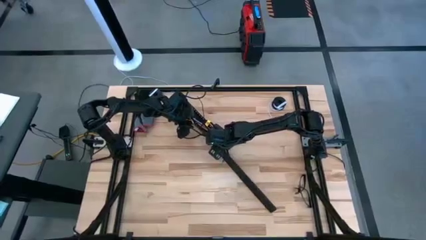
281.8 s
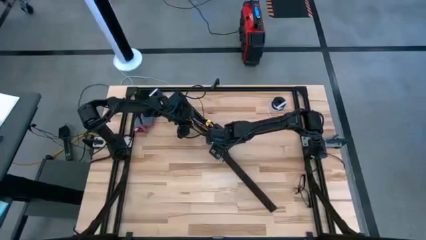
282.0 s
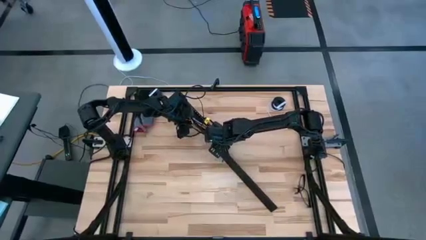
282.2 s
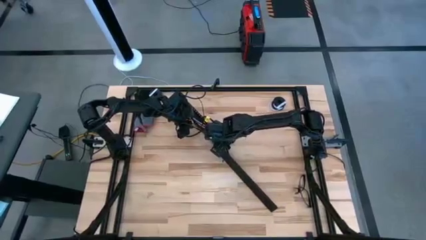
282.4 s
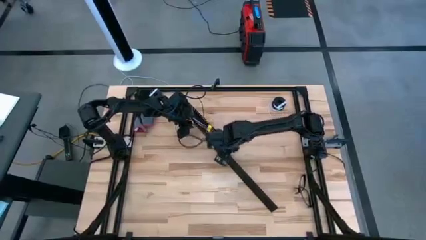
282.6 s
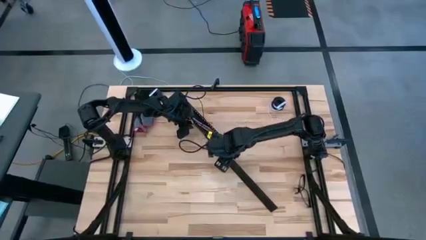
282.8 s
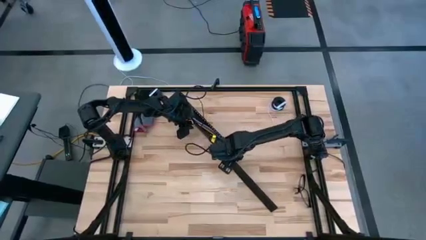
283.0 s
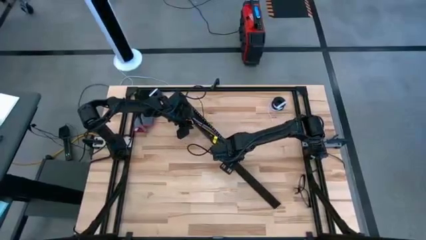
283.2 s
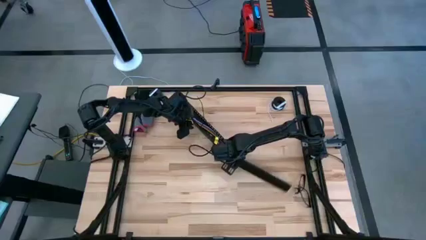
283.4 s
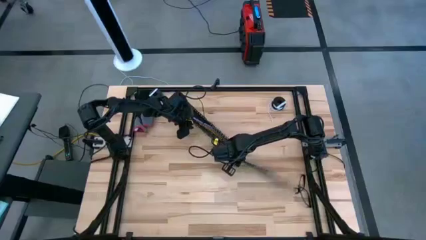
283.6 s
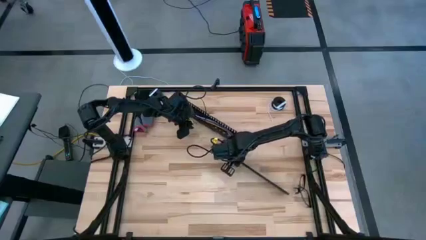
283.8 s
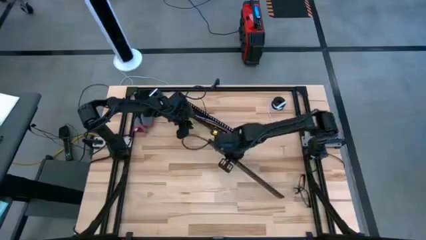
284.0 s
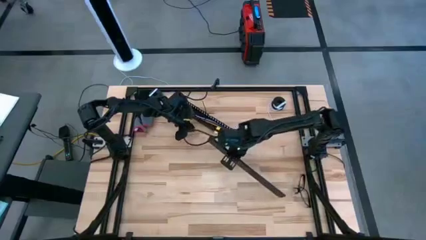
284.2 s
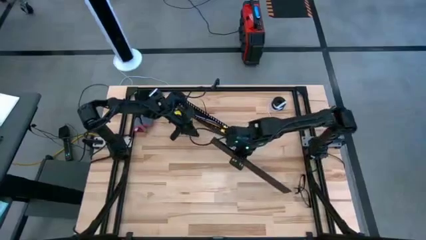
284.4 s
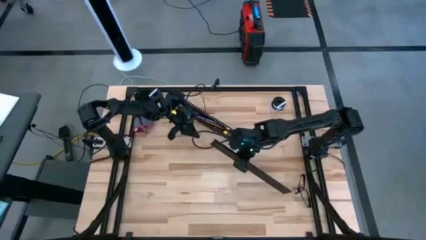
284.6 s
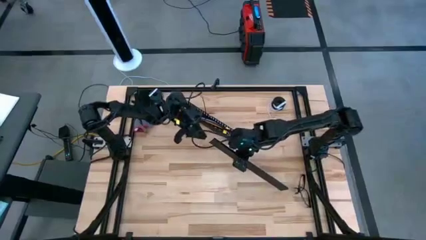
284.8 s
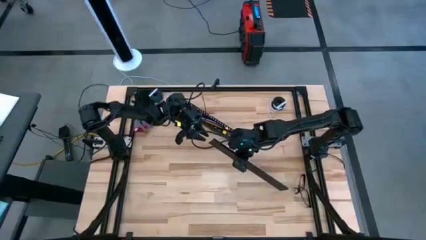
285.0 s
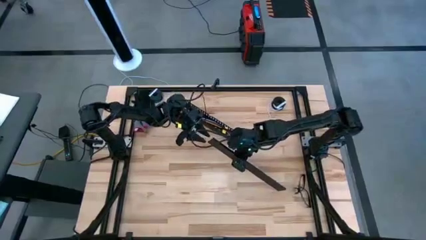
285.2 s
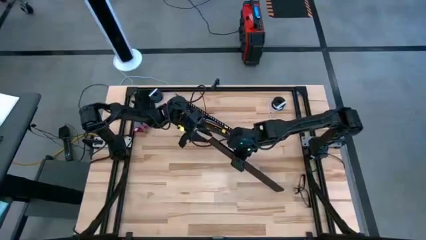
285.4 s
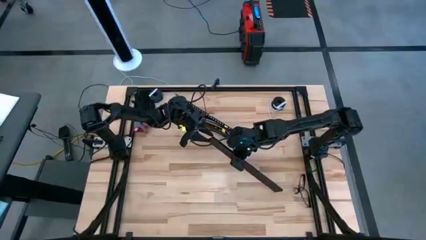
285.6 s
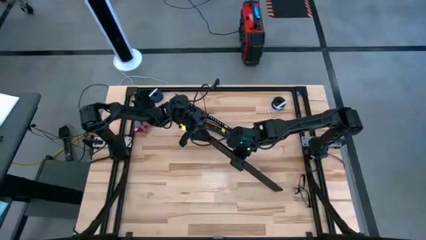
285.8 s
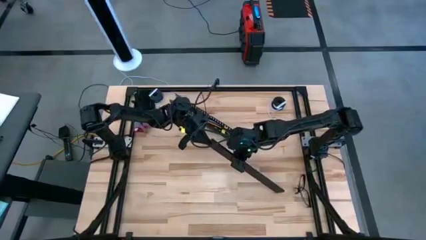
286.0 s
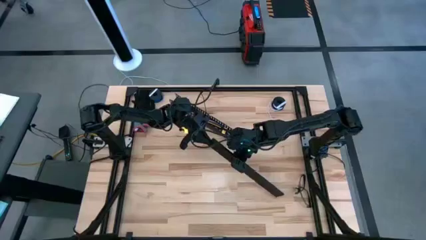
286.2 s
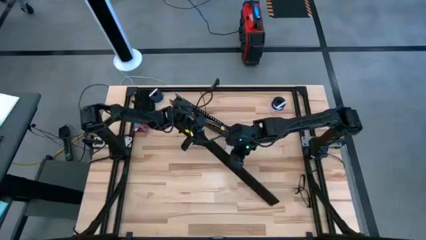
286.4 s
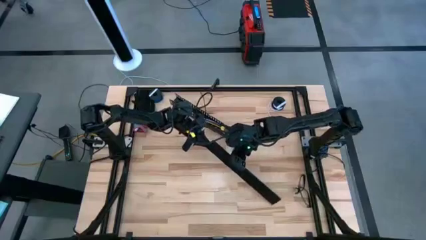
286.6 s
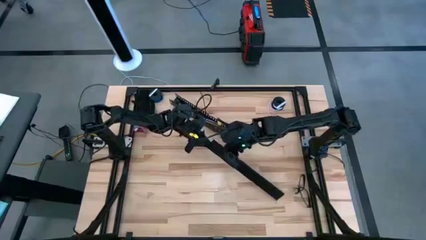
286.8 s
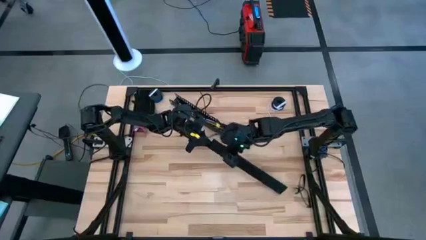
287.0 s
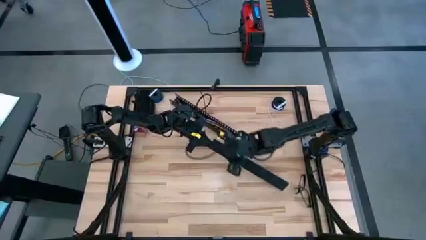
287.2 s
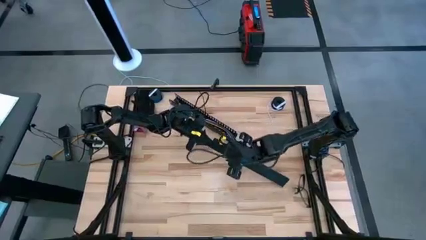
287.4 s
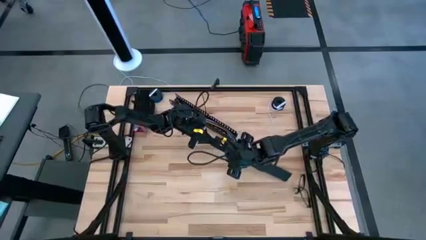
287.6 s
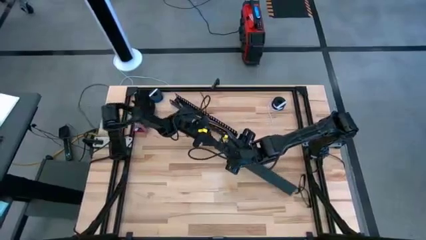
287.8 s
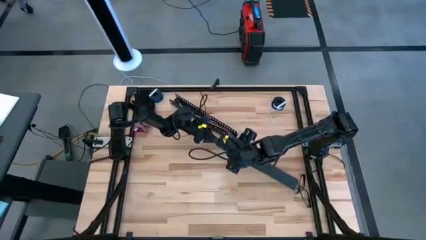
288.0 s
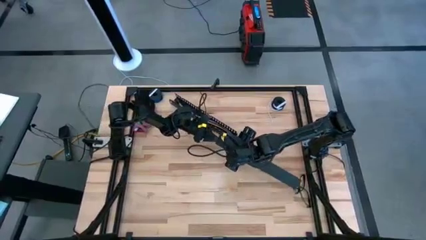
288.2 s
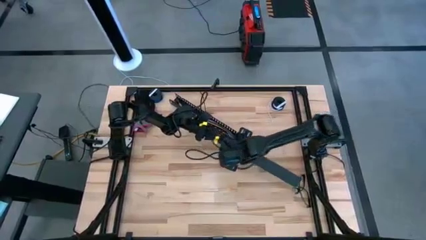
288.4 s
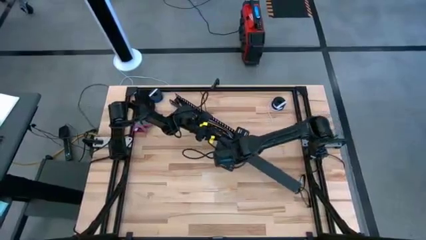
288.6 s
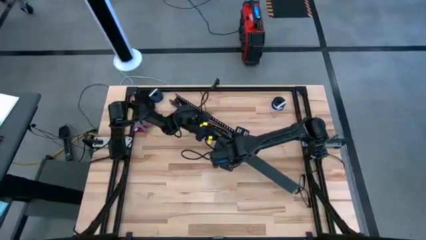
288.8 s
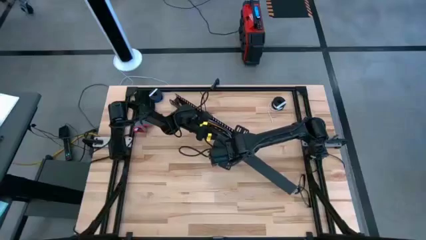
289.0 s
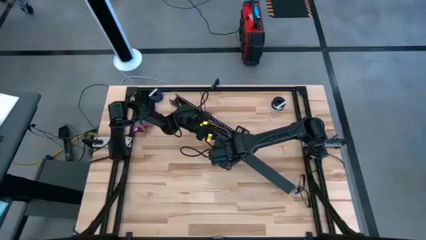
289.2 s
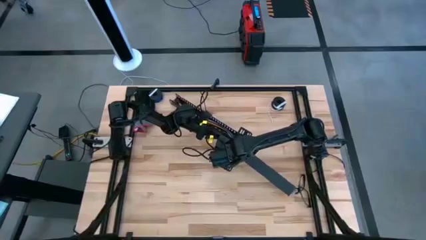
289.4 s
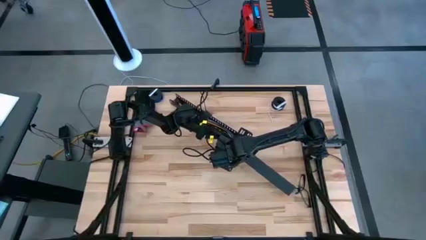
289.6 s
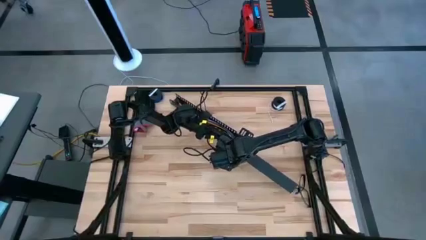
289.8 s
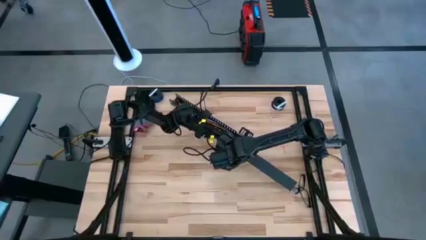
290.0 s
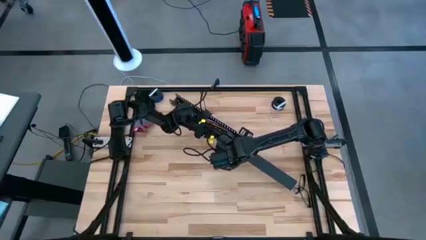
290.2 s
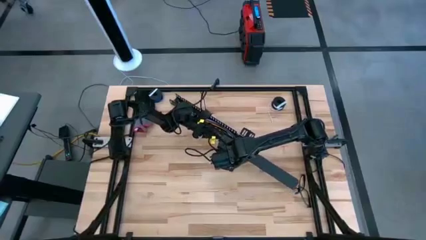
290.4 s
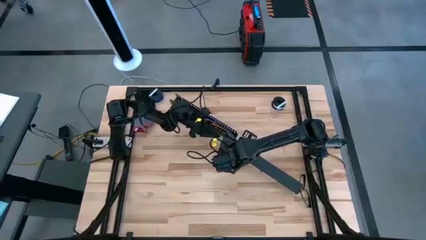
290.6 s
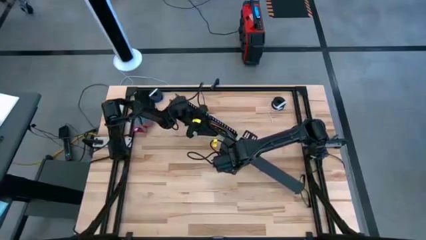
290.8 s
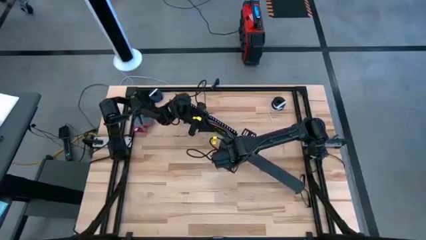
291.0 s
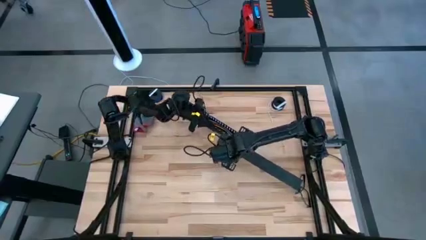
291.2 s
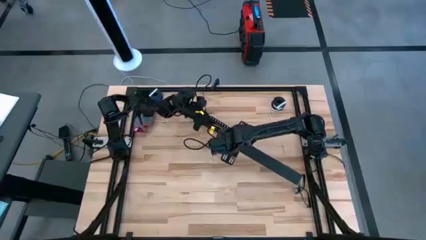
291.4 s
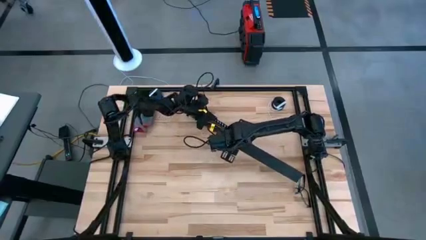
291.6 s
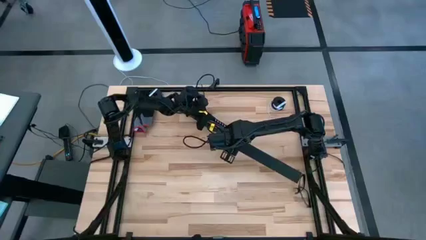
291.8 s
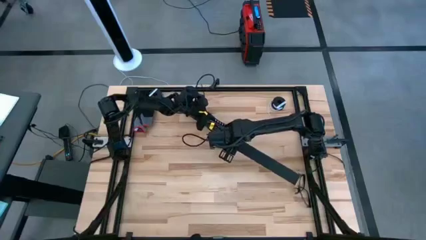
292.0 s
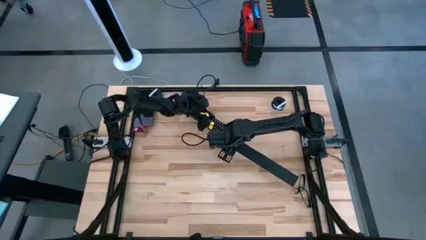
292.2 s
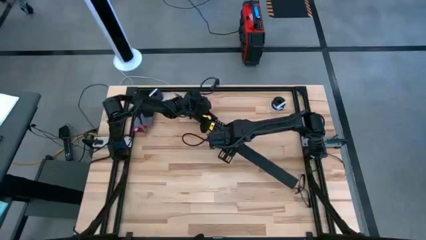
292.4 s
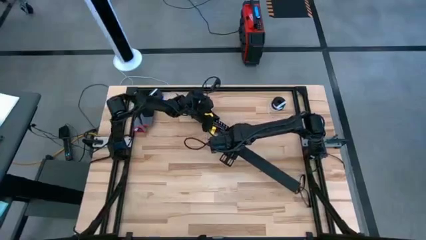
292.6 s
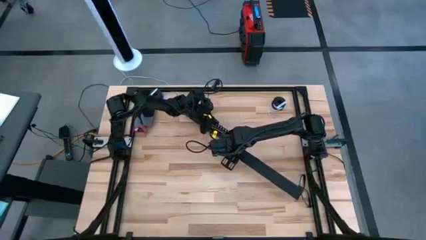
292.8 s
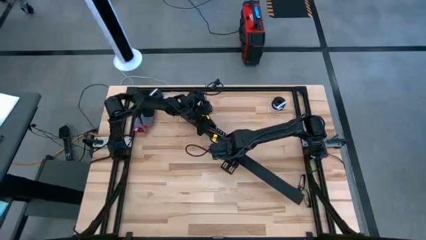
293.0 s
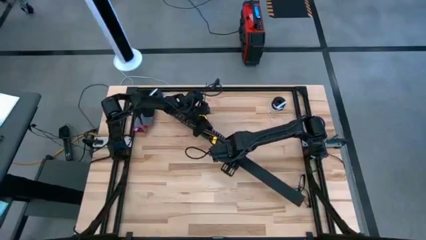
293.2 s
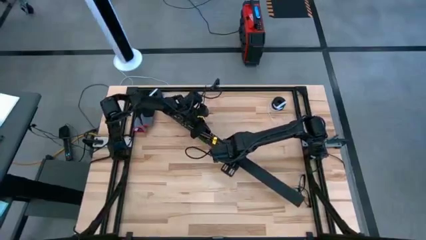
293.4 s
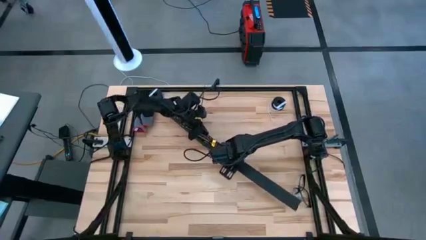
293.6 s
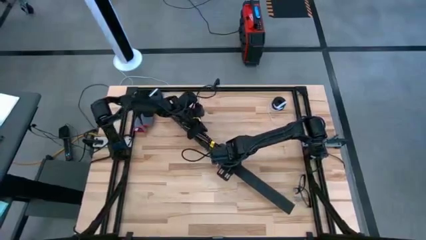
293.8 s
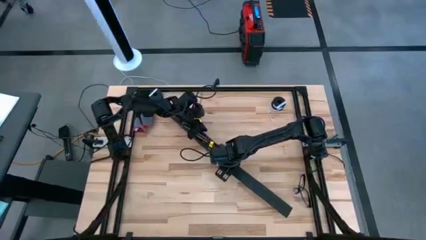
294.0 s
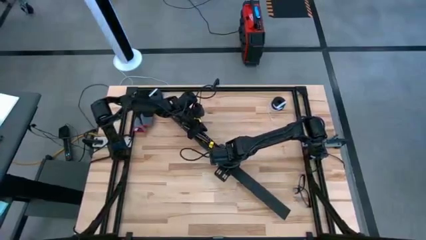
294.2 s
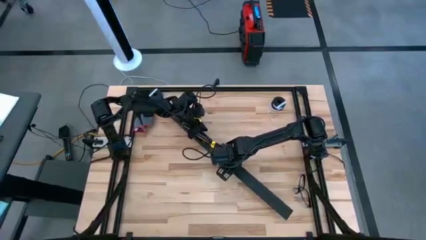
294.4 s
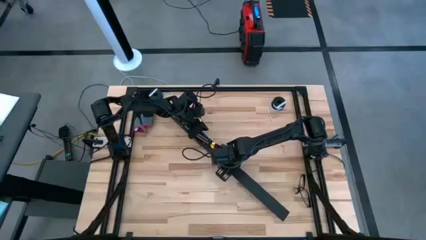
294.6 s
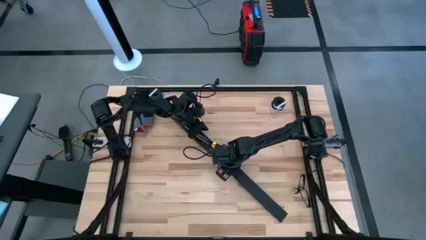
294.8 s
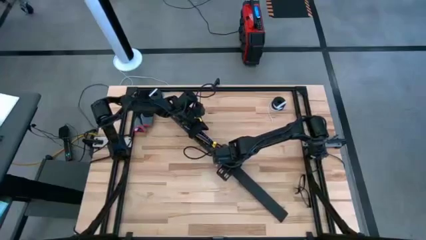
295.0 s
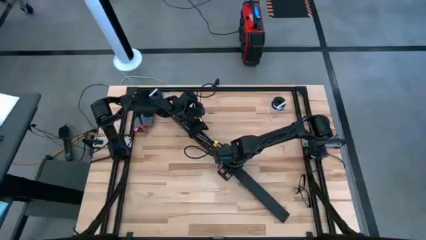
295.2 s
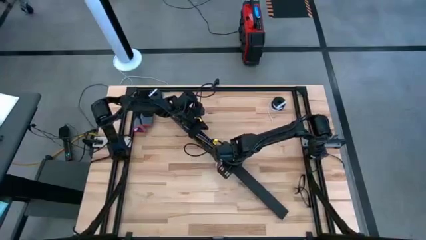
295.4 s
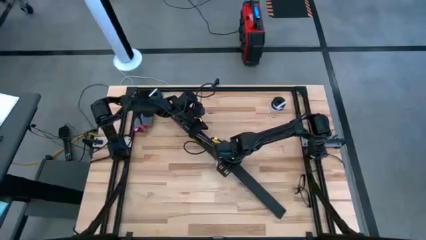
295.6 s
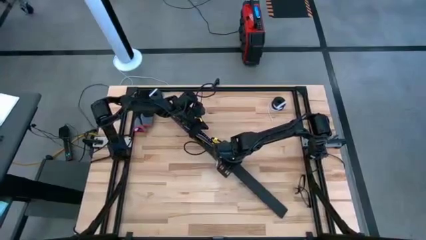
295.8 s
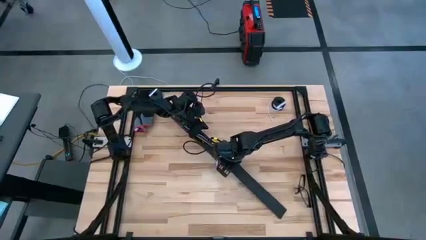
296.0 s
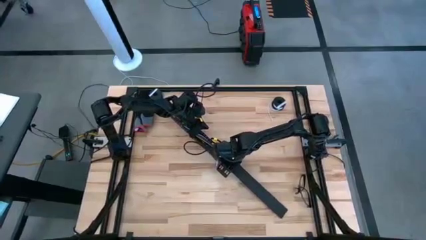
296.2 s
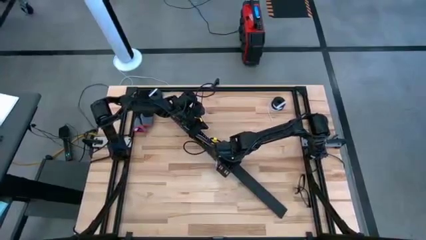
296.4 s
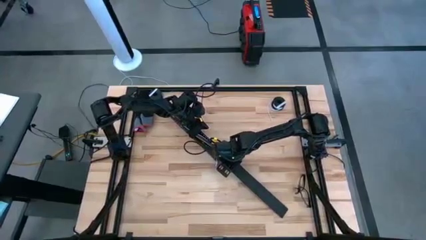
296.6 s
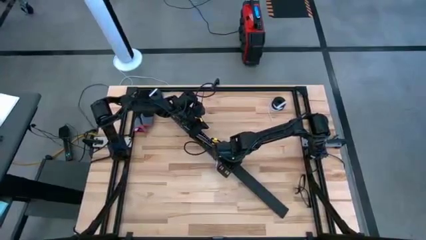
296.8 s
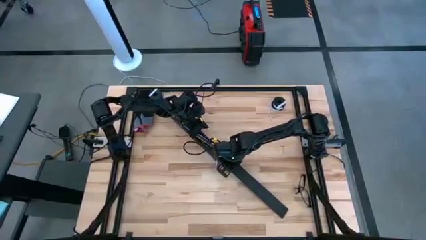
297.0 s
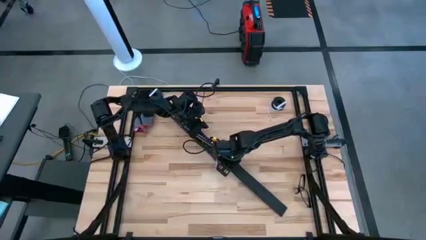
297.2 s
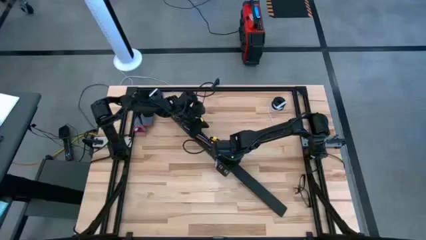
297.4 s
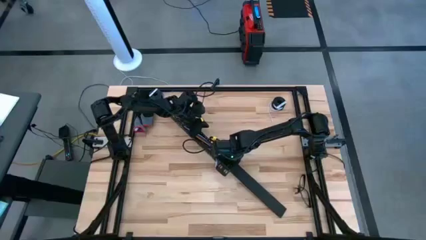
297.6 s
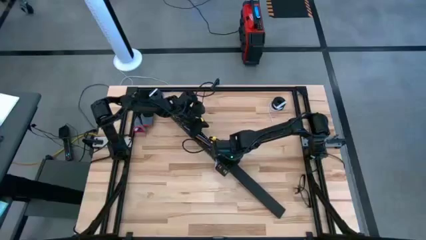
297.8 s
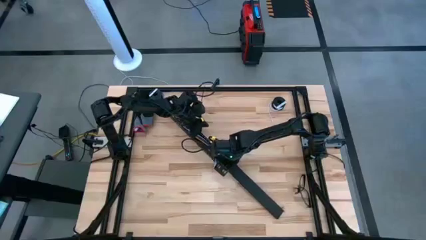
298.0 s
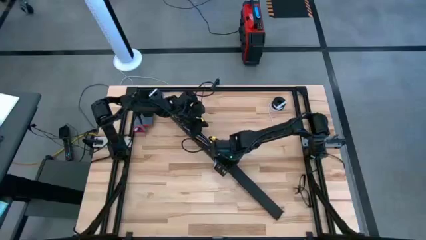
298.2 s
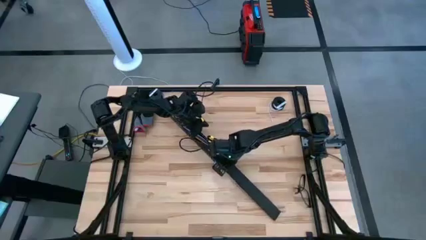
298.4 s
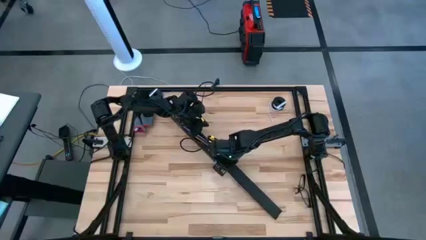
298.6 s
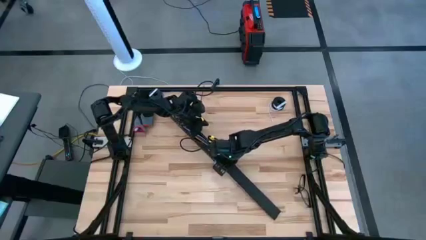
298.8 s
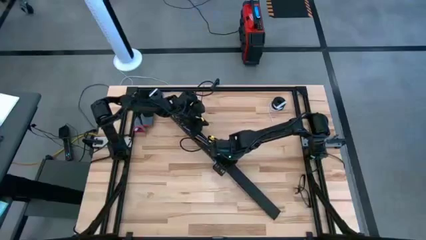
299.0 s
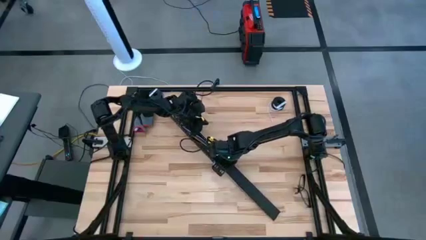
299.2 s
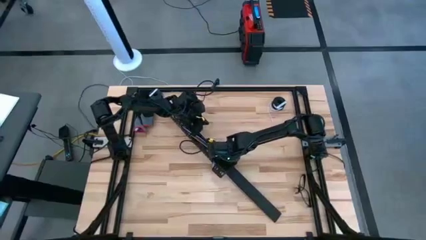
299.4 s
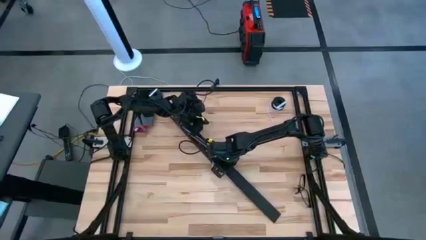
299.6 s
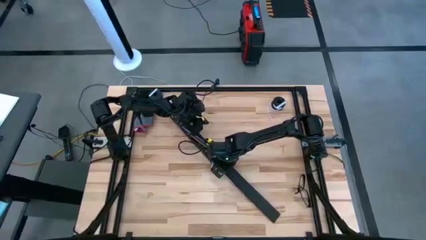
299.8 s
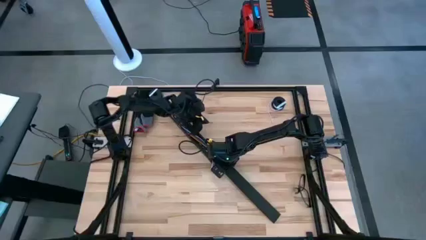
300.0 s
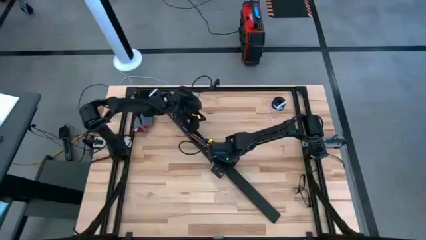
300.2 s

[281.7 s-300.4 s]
Task: Ziptie cables
Close the black cable duct
